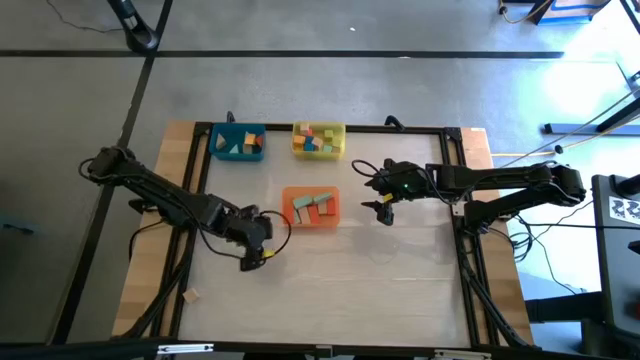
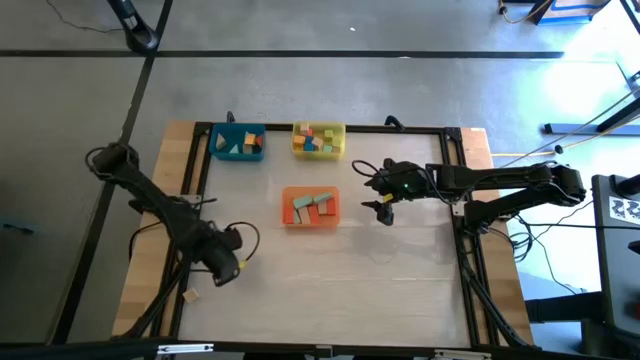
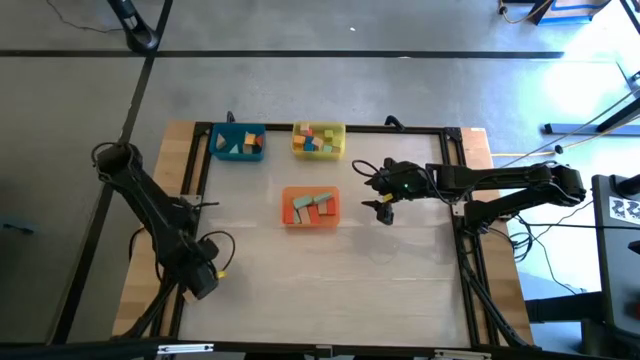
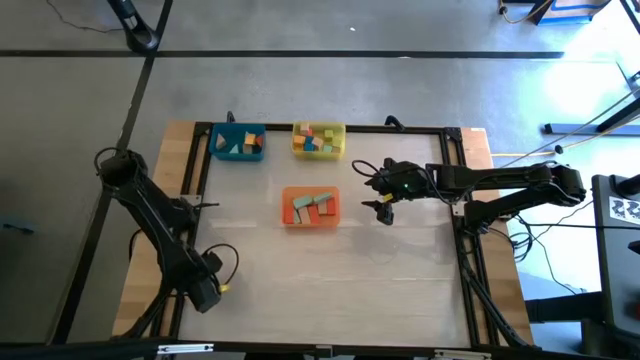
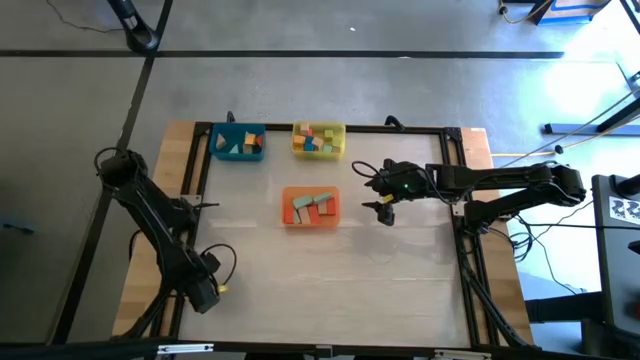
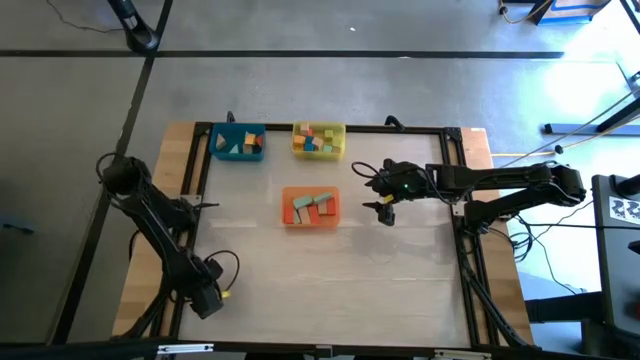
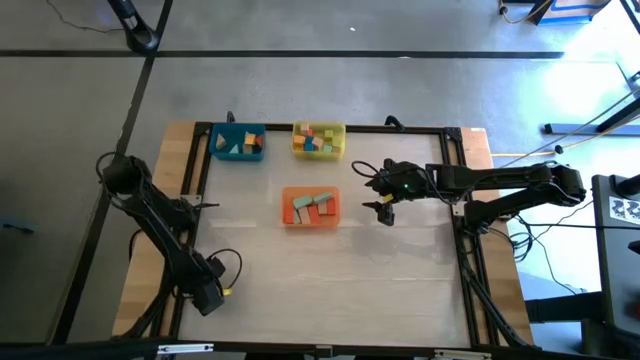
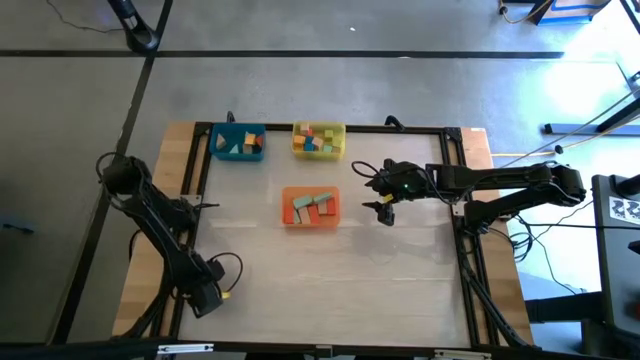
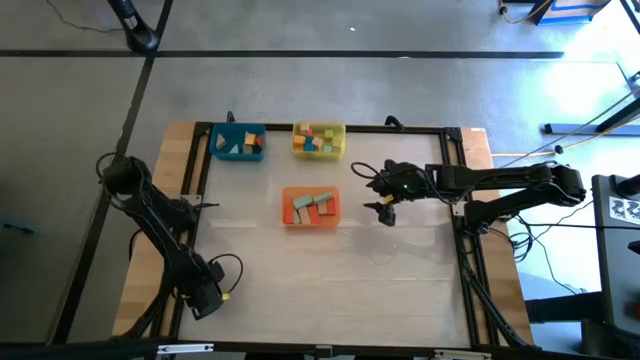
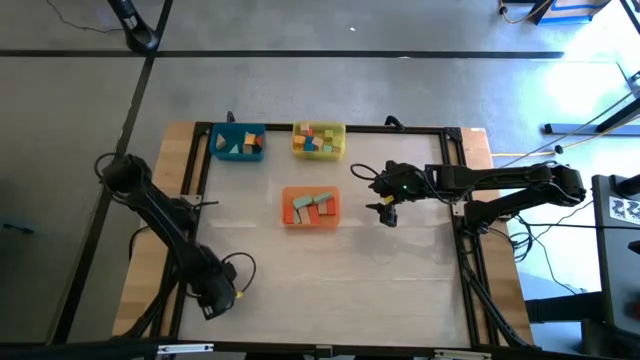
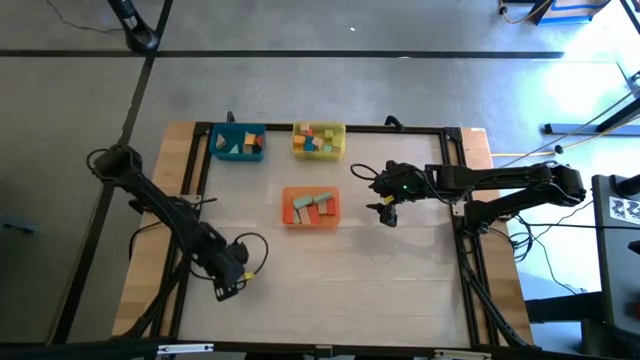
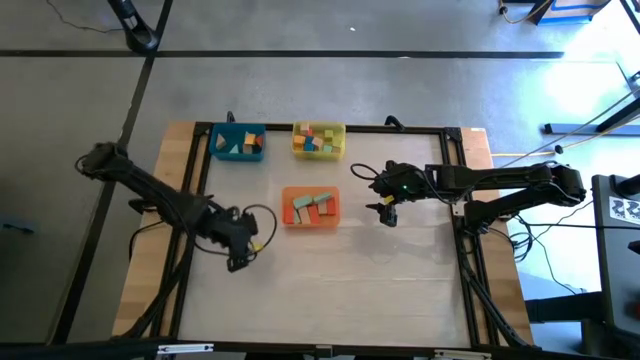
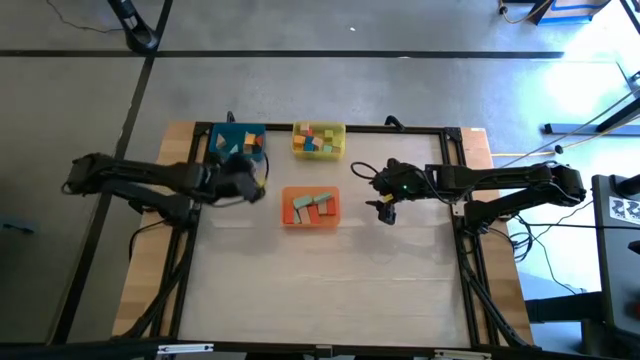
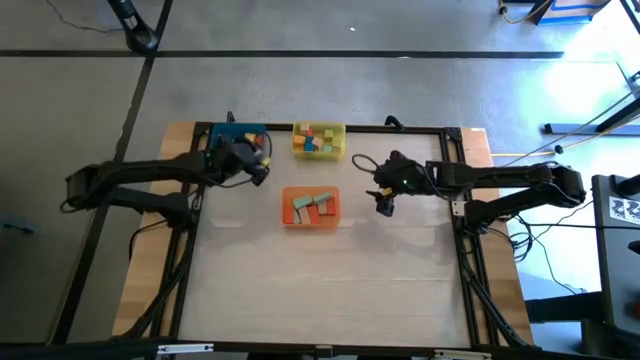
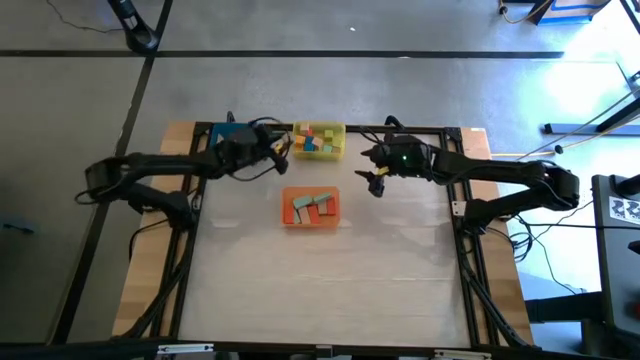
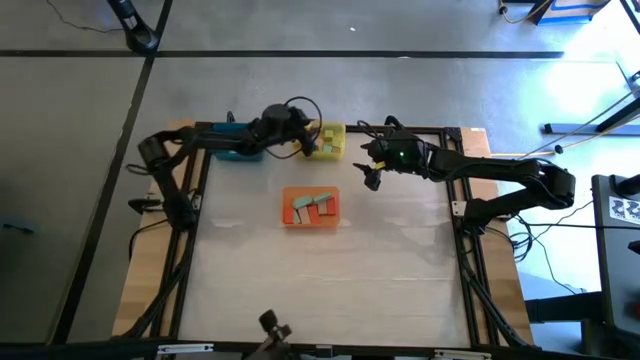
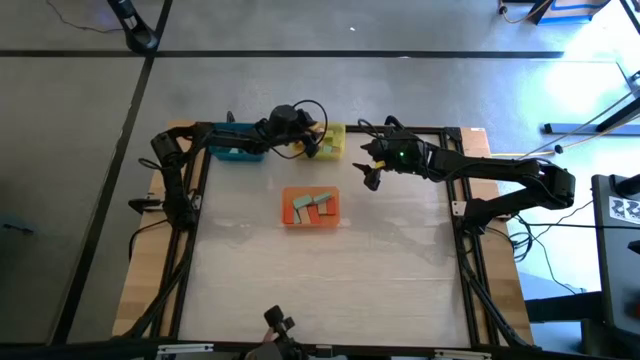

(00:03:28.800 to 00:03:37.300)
Task: Sort blocks by size
Put the brown square block into the yellow bin

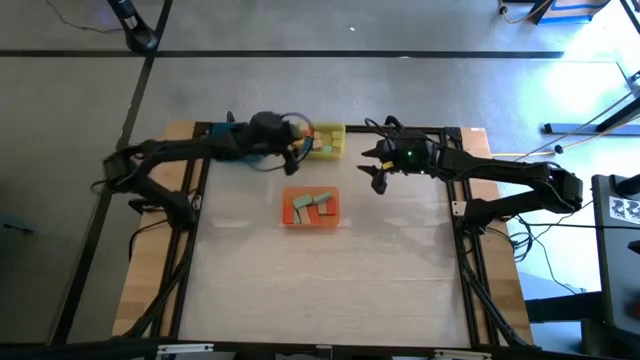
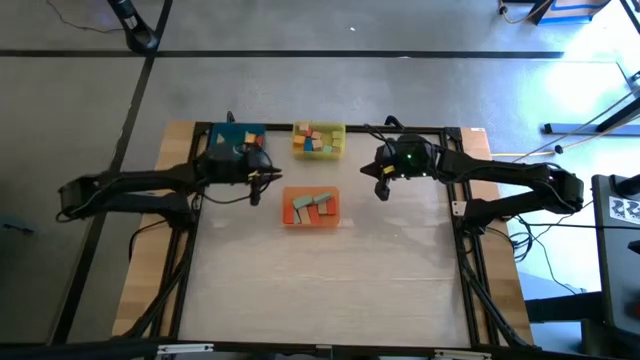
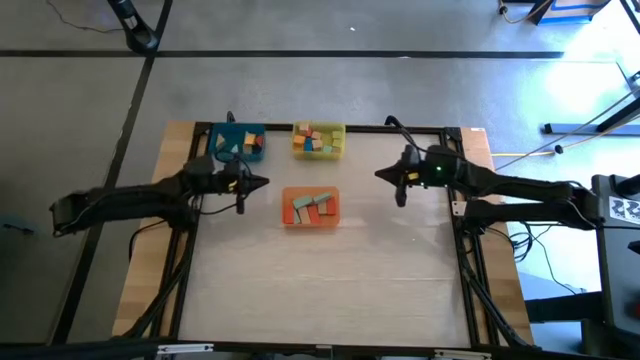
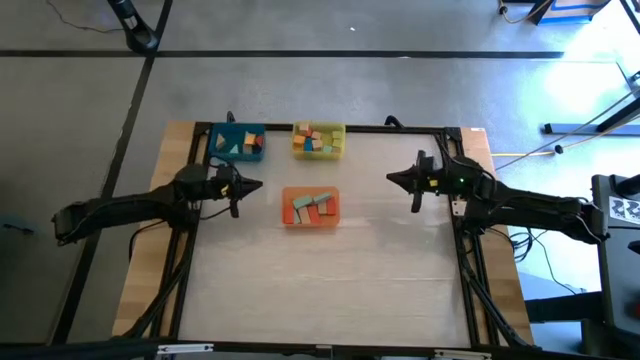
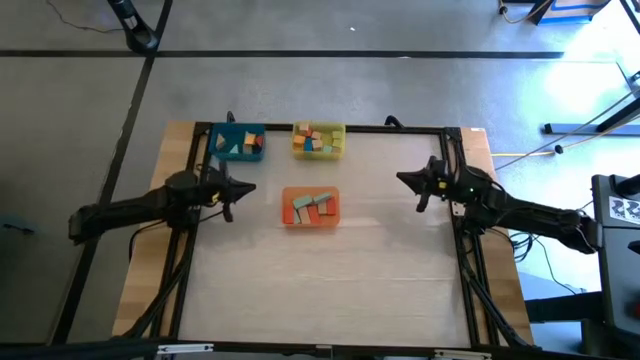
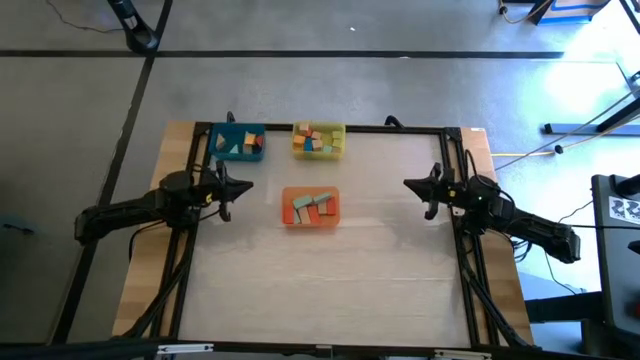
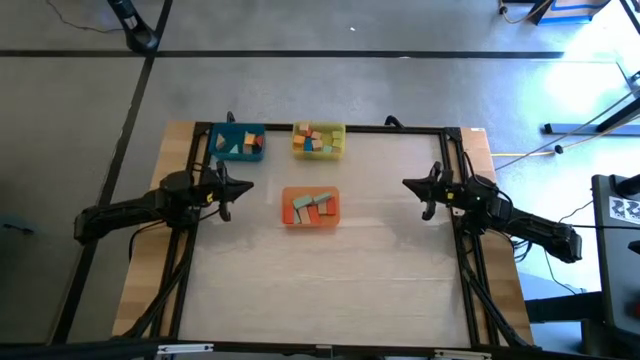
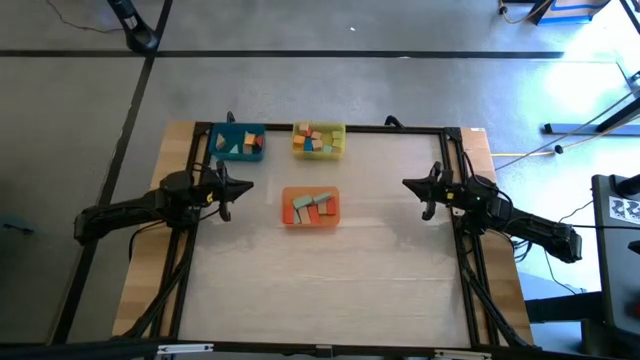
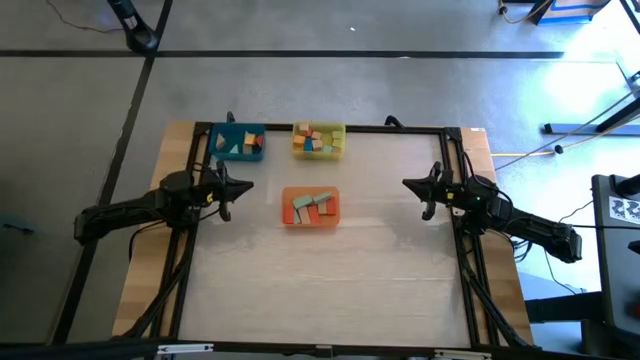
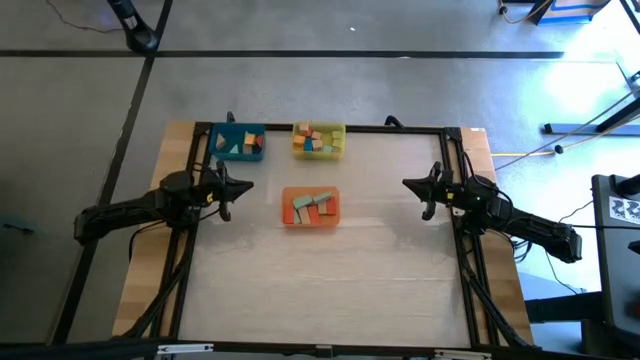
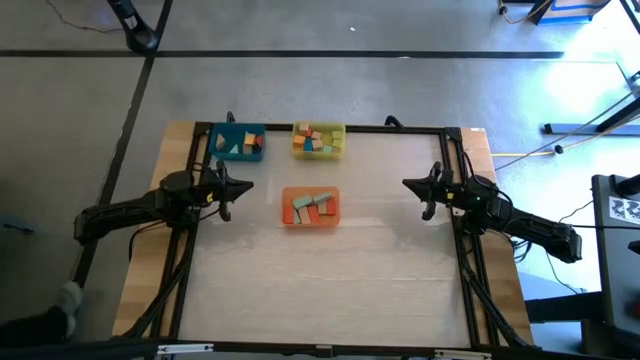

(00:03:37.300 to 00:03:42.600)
Return to Home Position

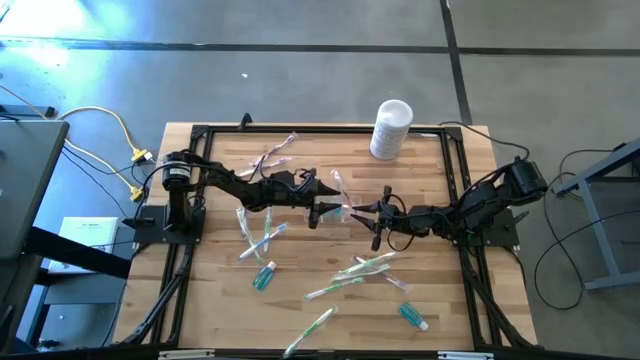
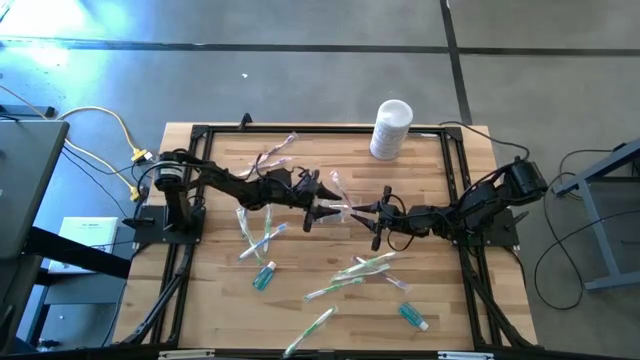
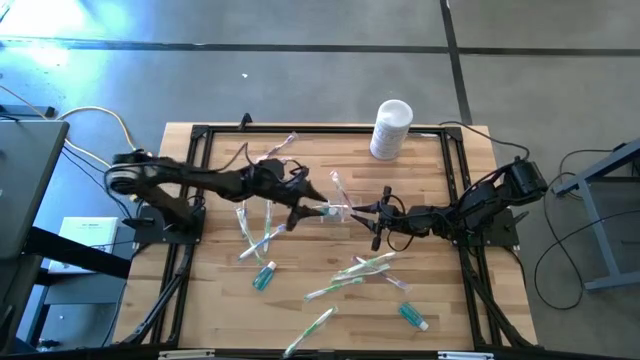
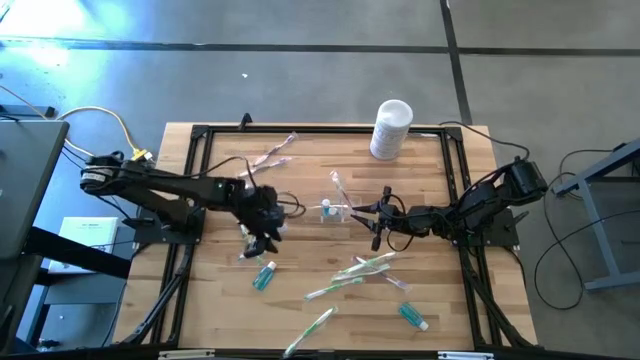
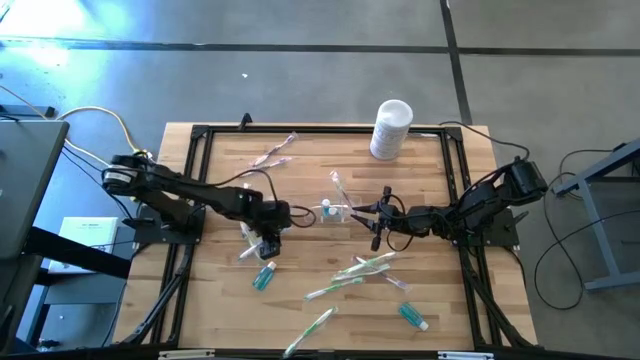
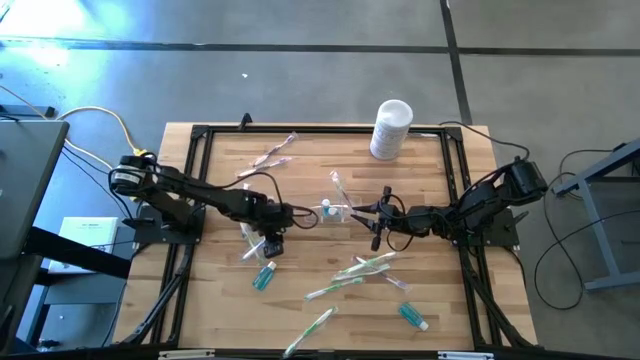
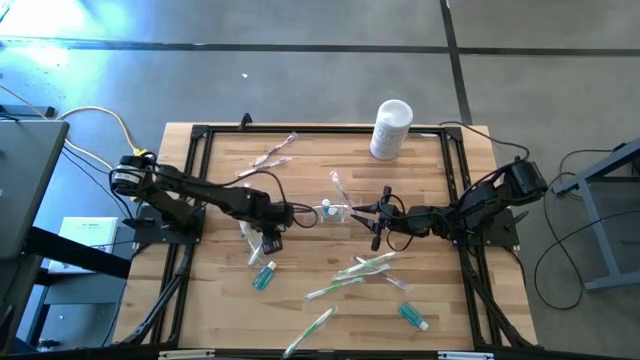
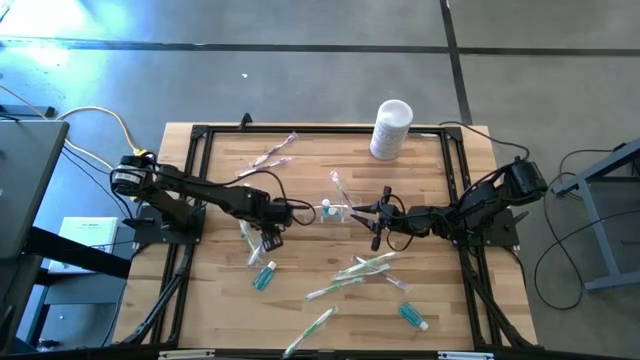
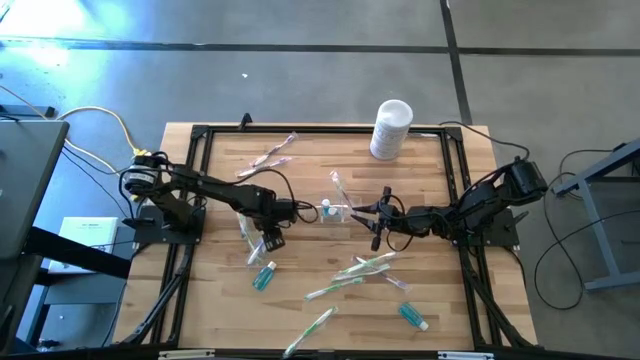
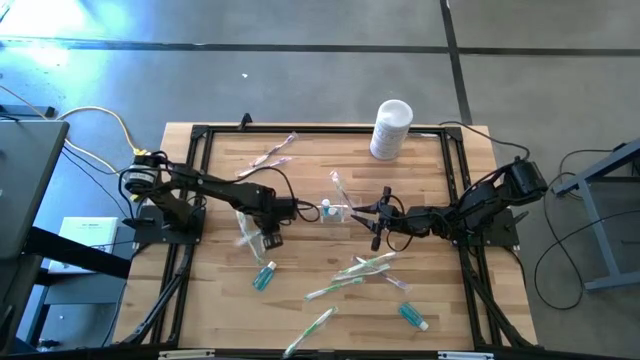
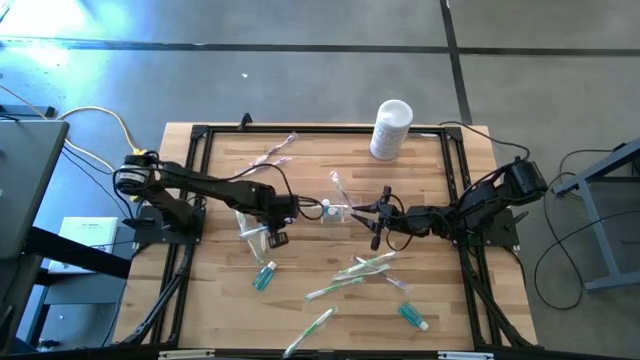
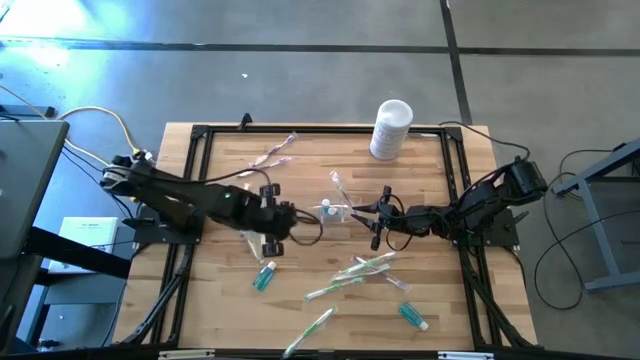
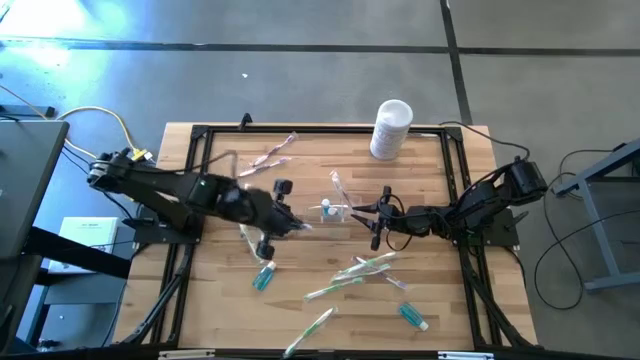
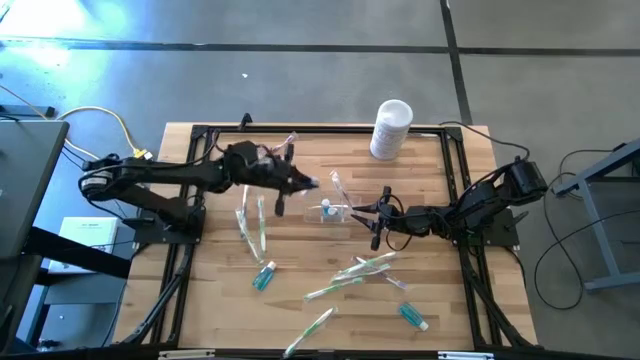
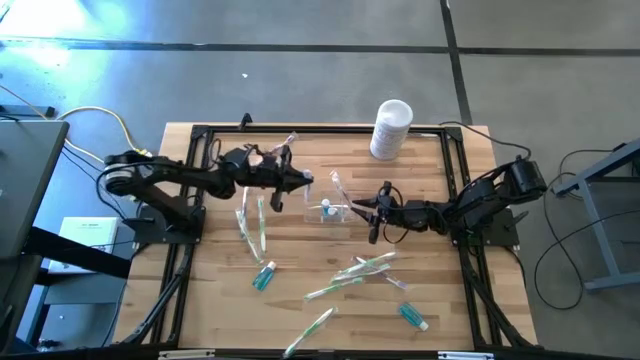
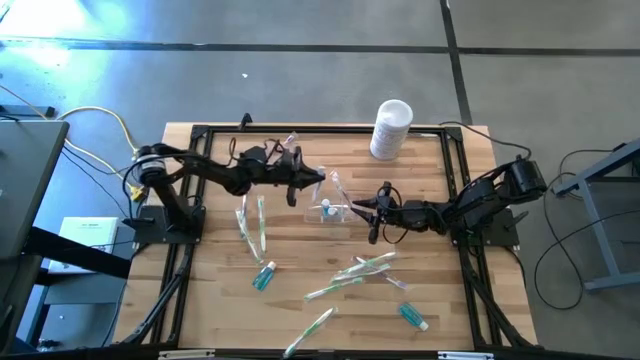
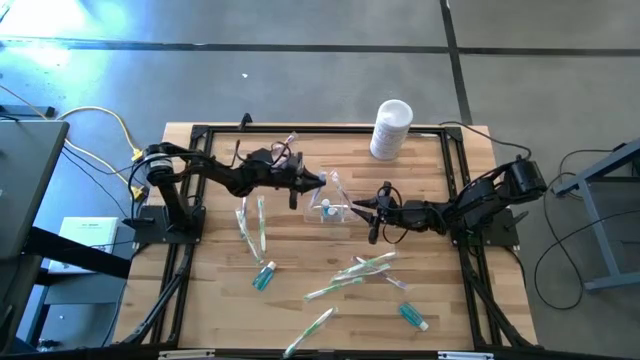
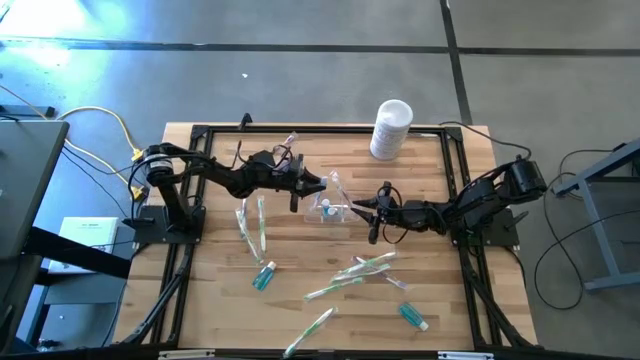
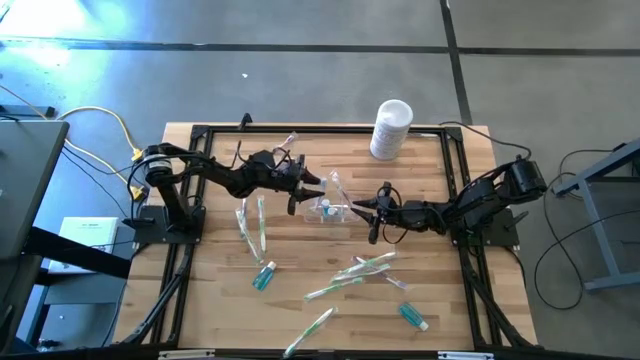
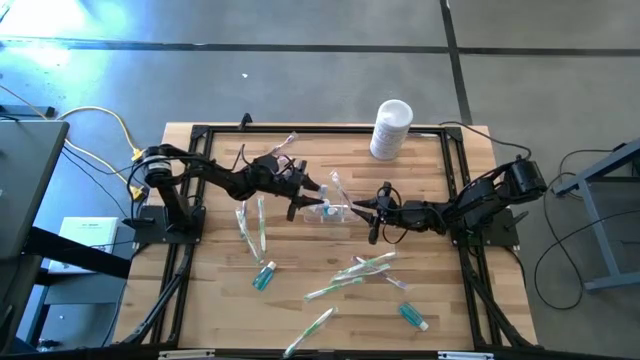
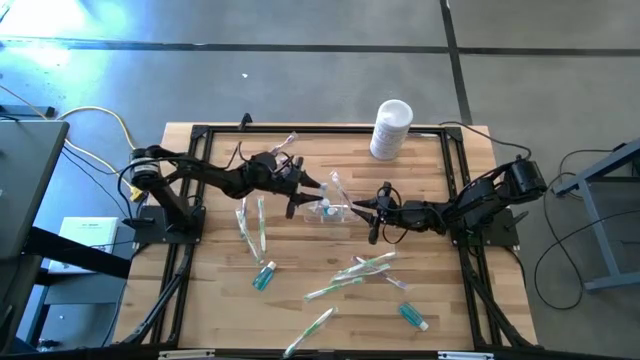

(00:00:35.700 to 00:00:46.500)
Task: Pick & Place toothbrushing station
Put the blue toothbrush into the transparent organizer
